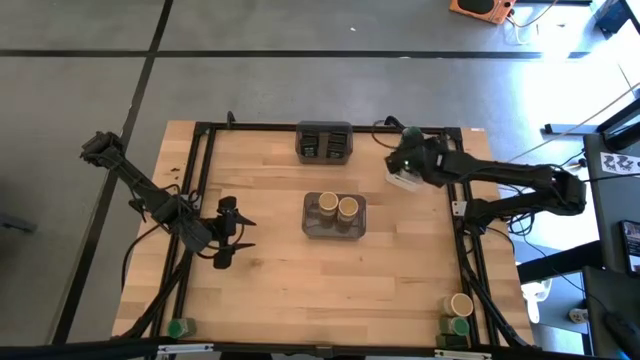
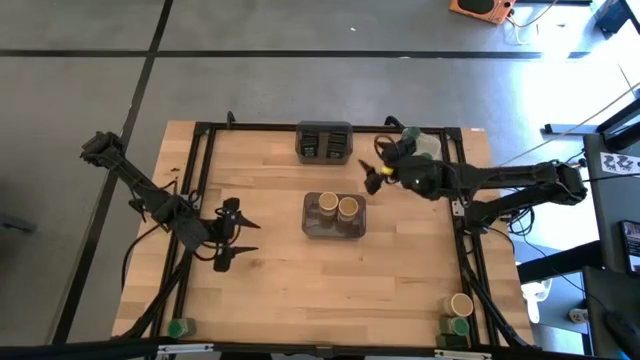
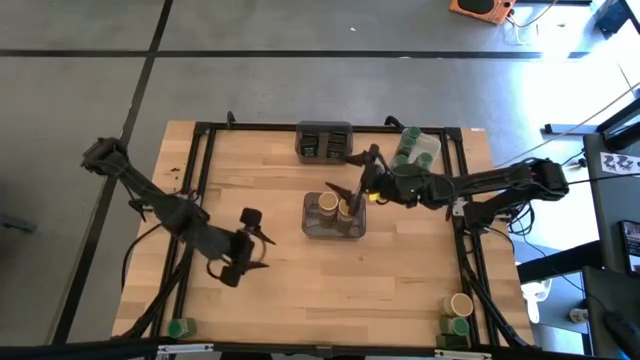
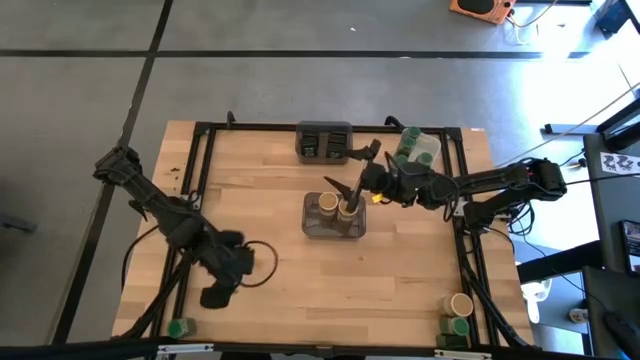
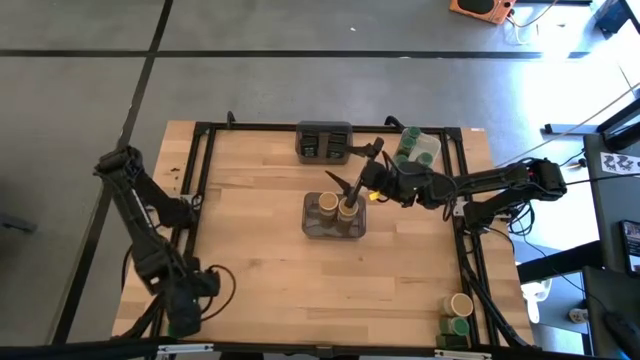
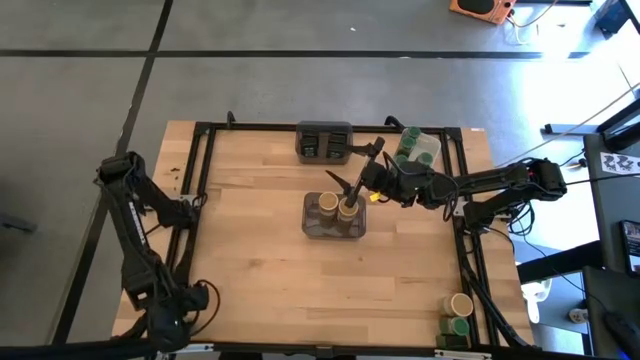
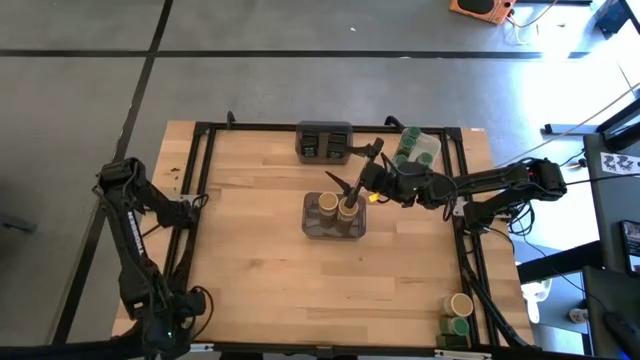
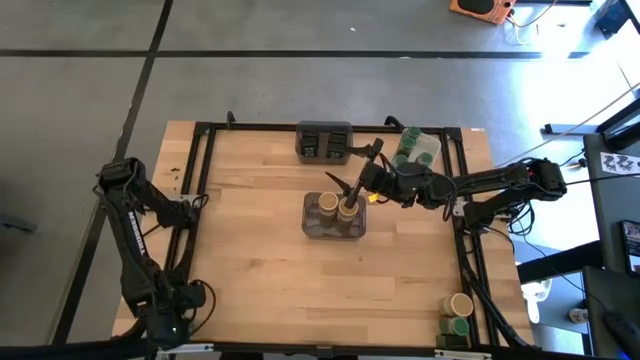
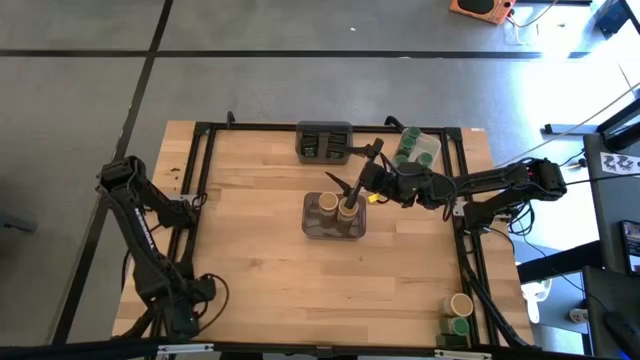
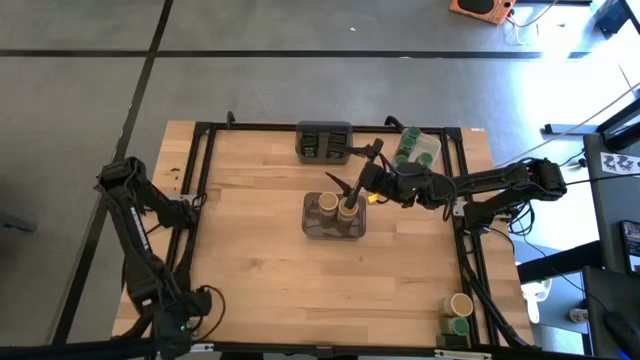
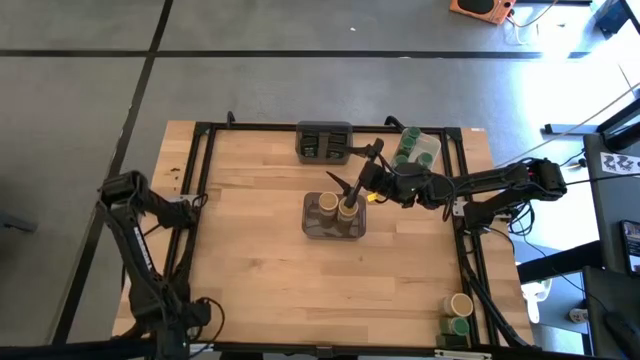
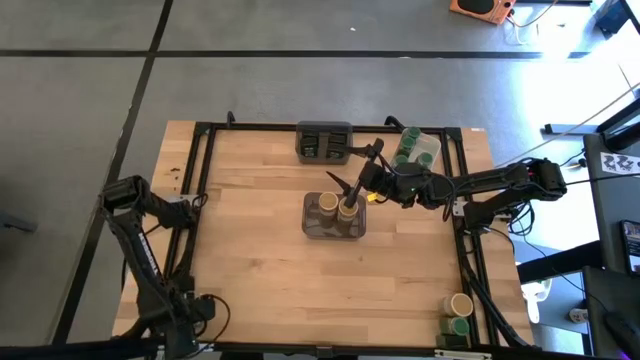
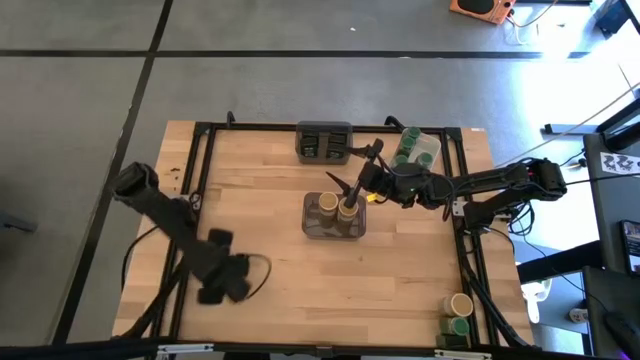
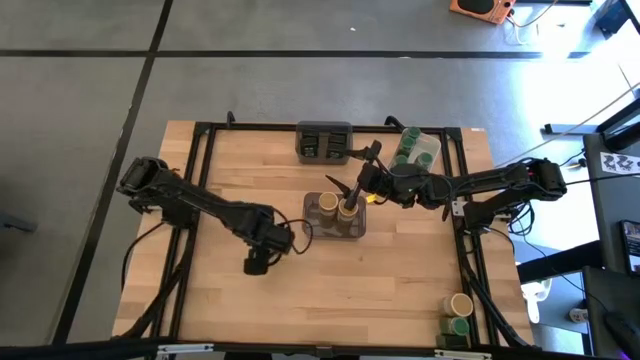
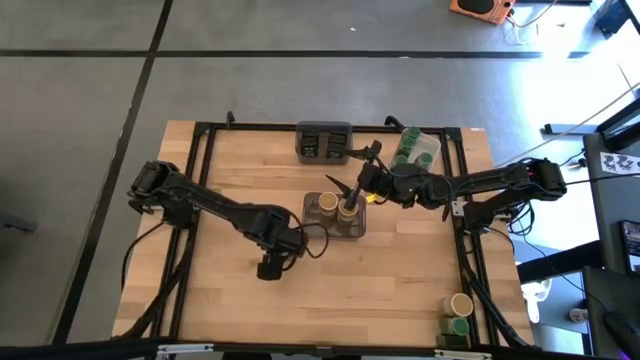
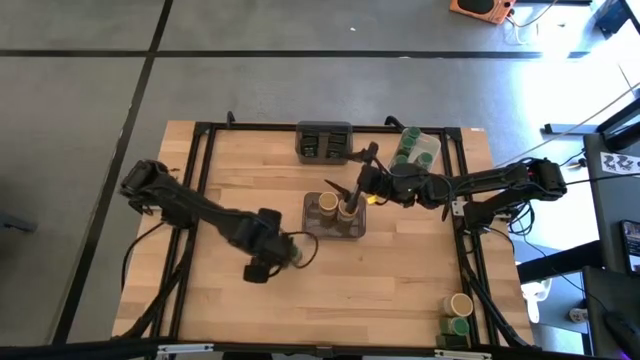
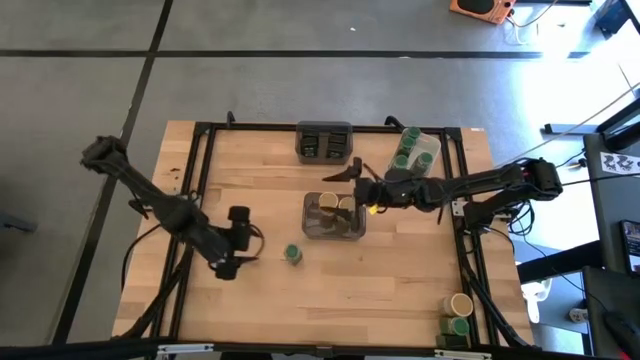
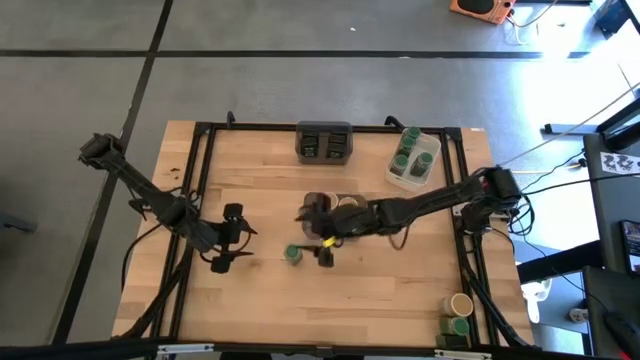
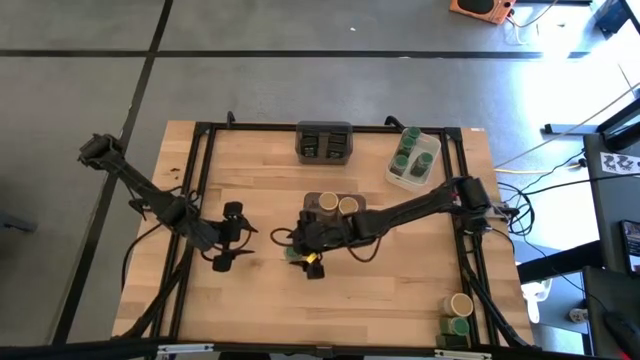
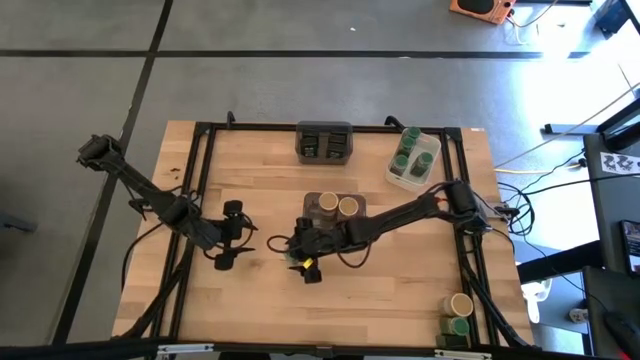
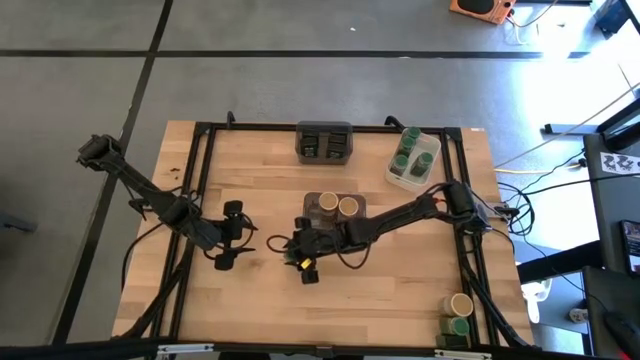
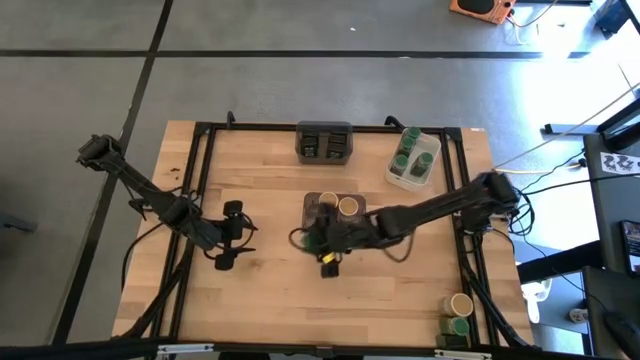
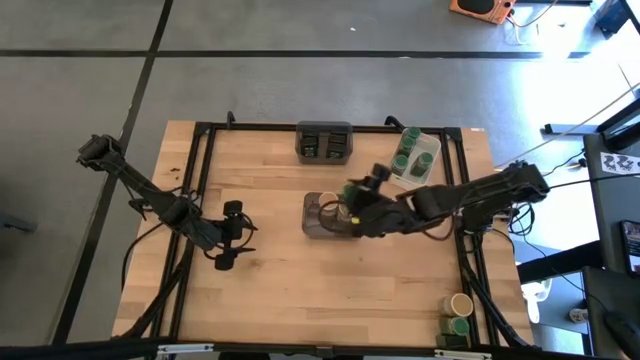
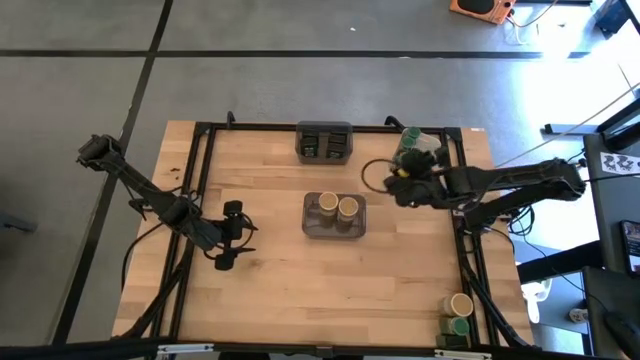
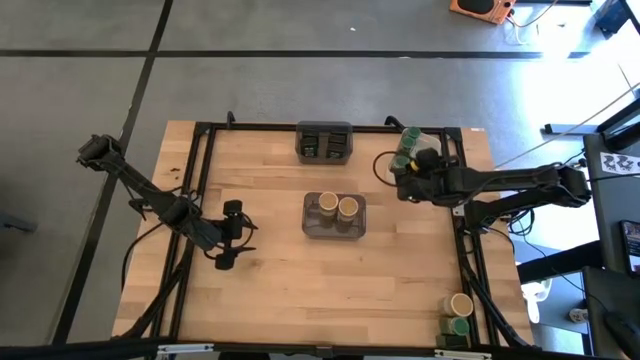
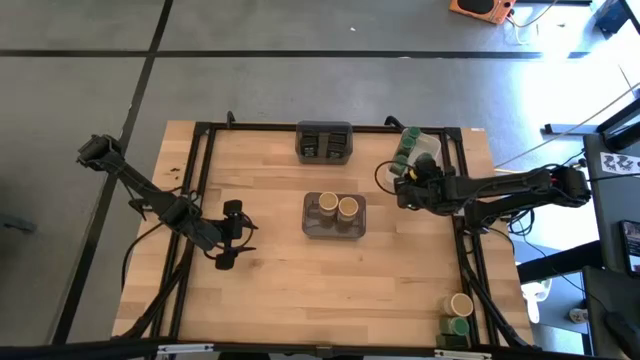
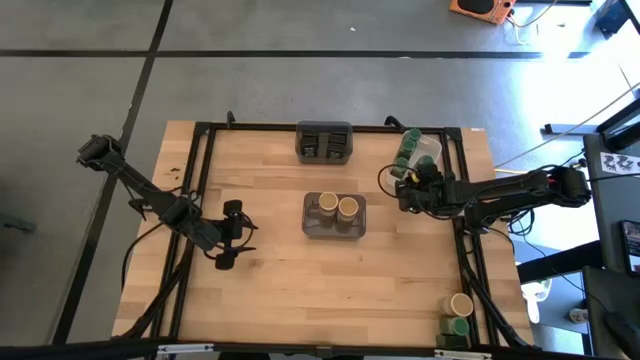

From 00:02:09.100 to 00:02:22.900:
Task: Sort spices by type
Put the green seasoning bottle into the white bin

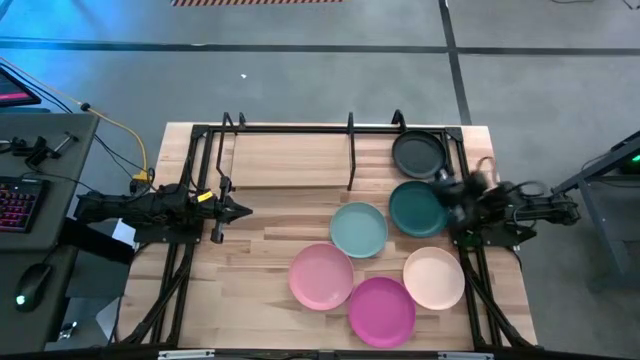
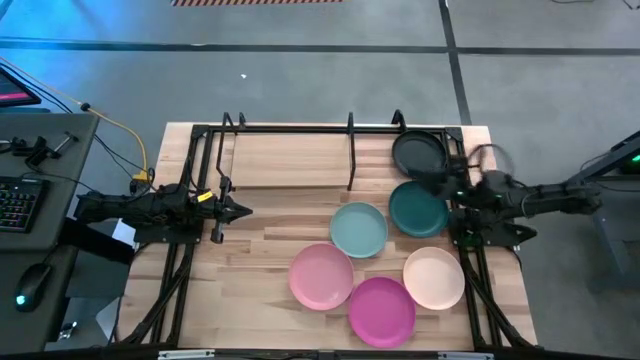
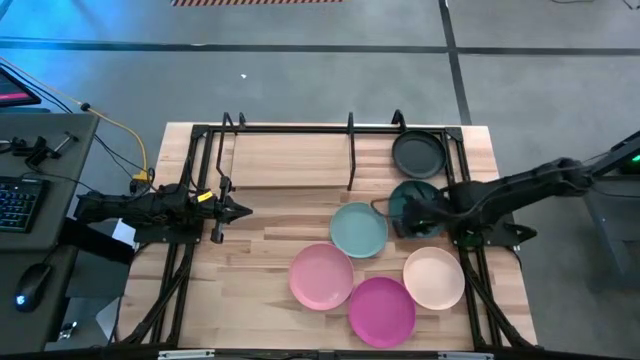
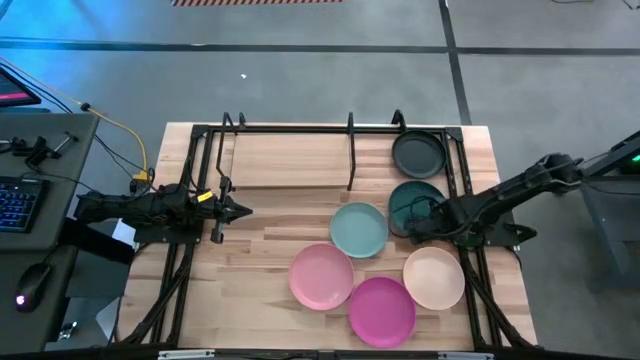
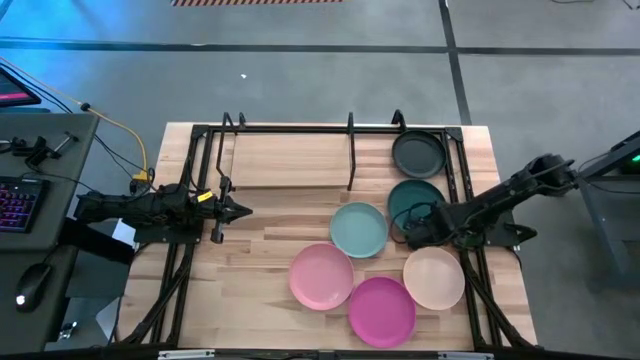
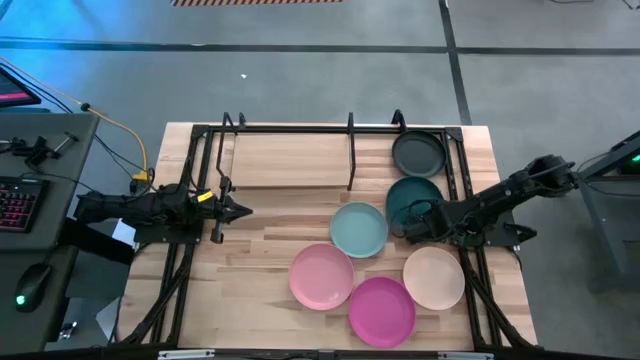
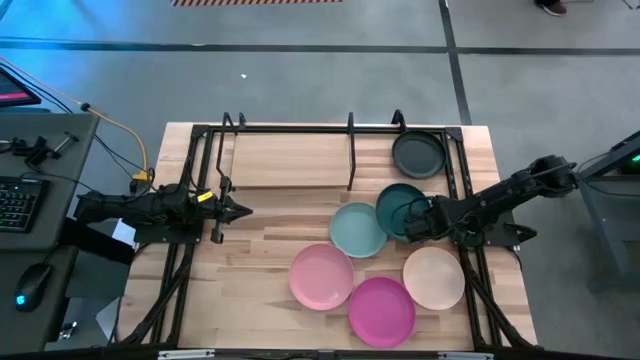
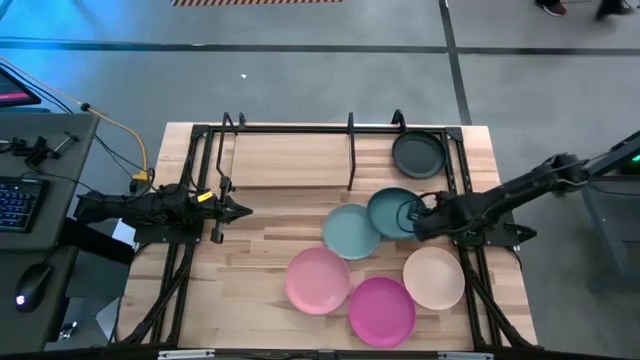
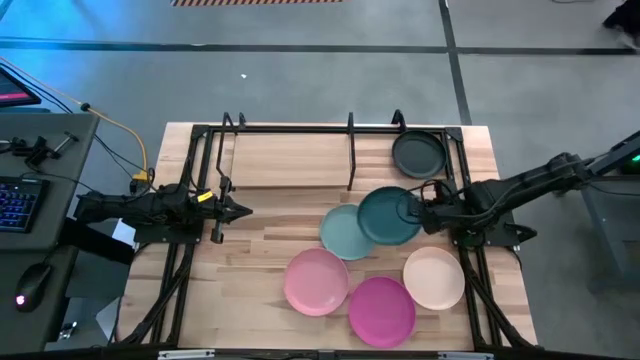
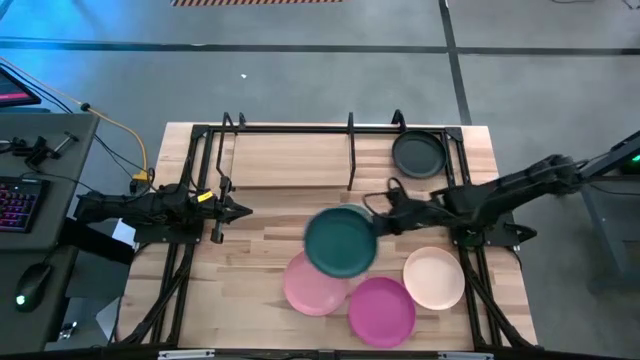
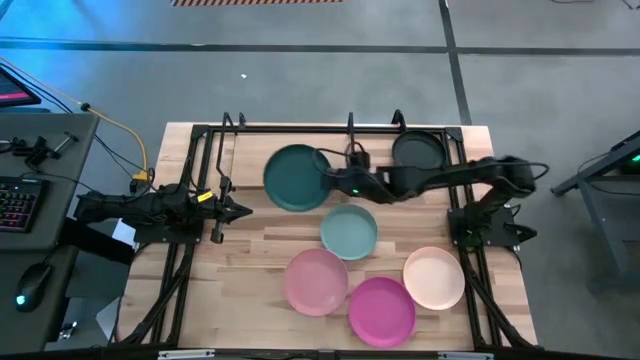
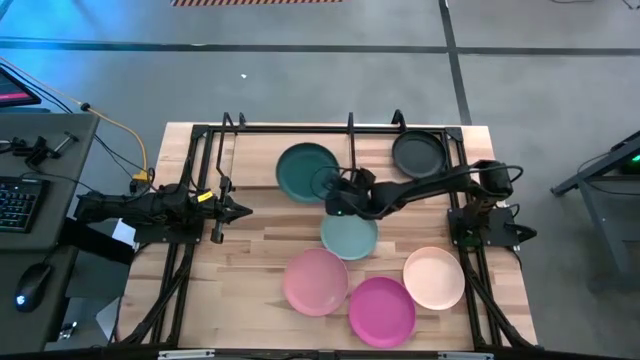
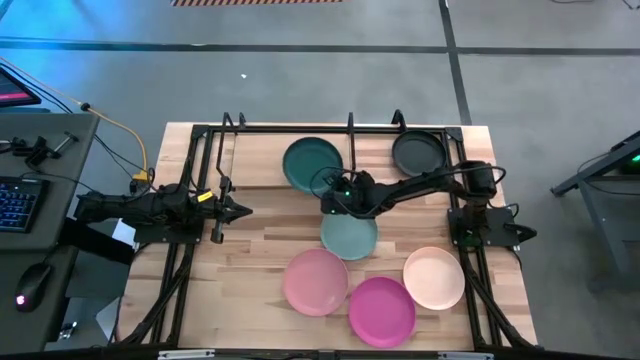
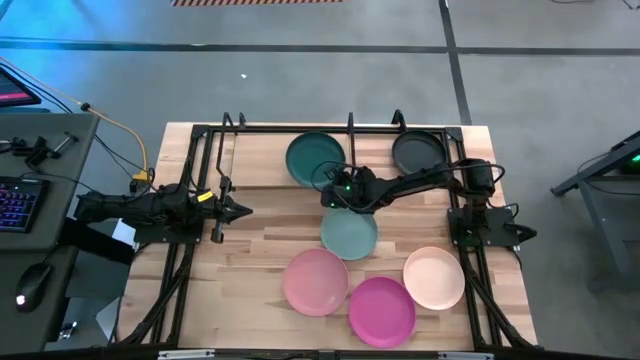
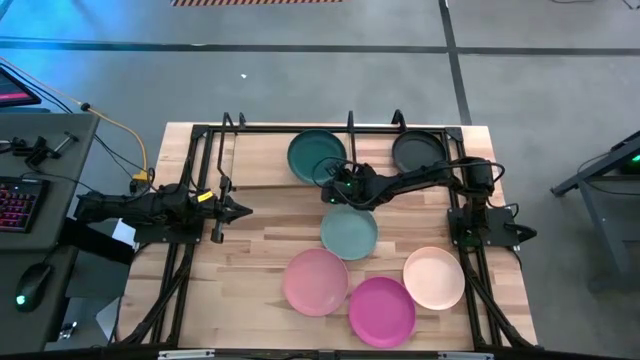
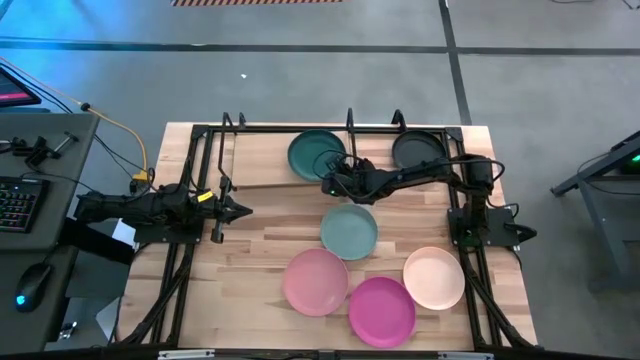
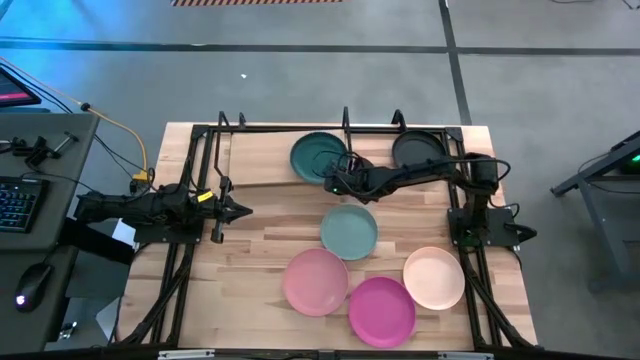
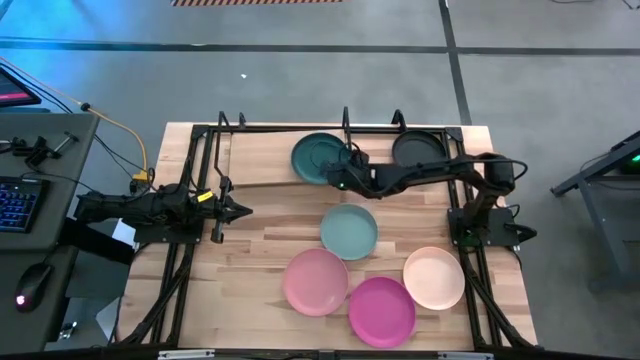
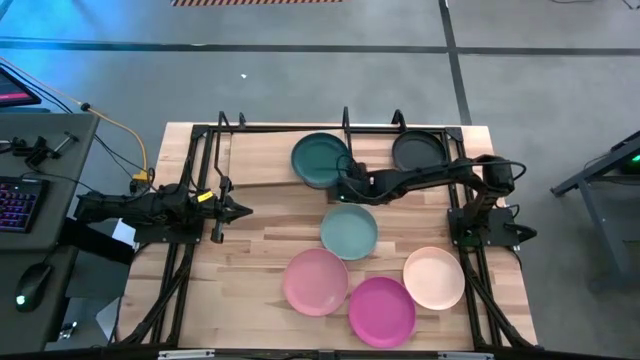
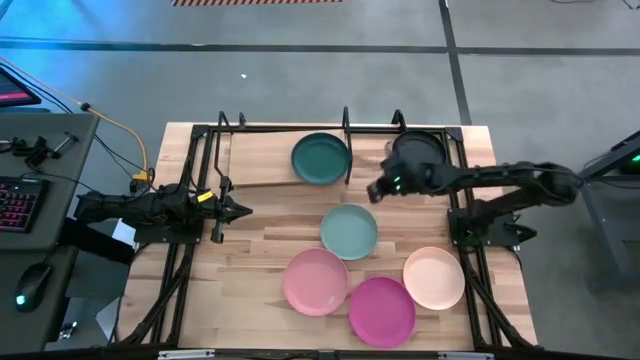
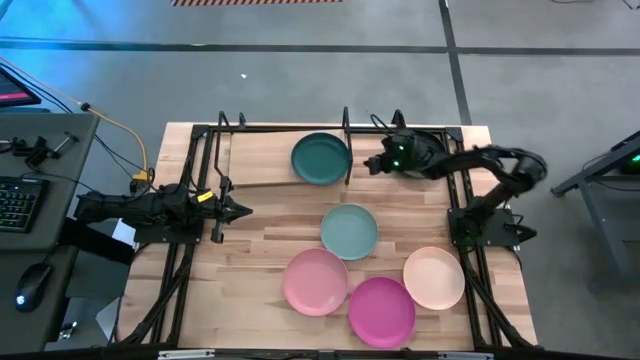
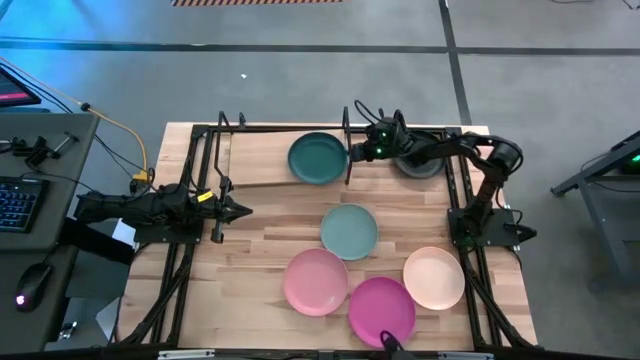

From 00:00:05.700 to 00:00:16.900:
Task: Place and stack plates onto a shelf
Put the dark green plate on the shelf
